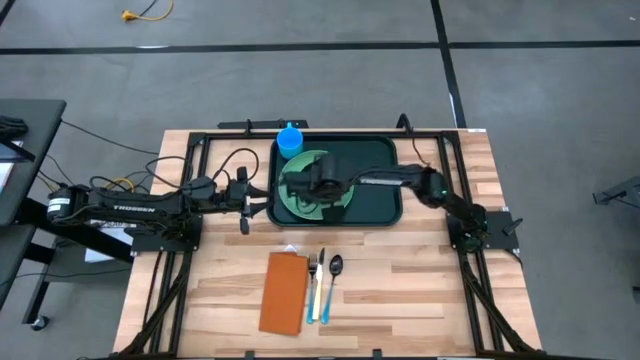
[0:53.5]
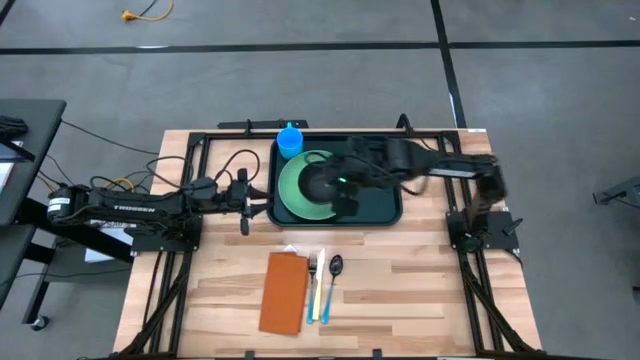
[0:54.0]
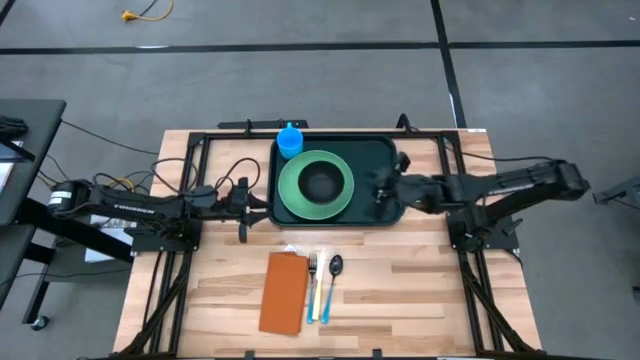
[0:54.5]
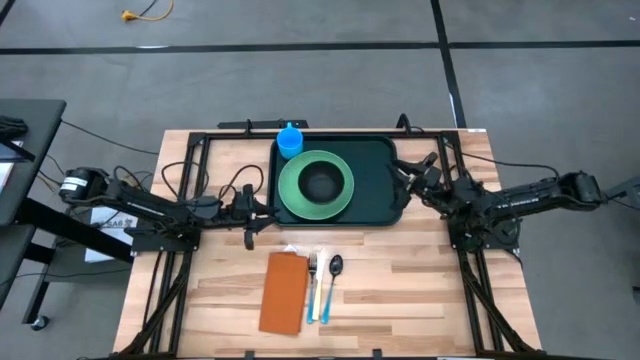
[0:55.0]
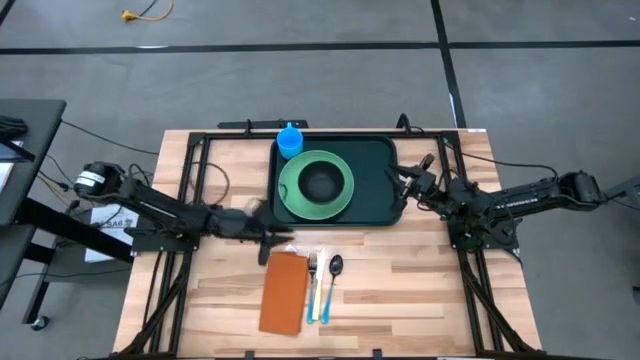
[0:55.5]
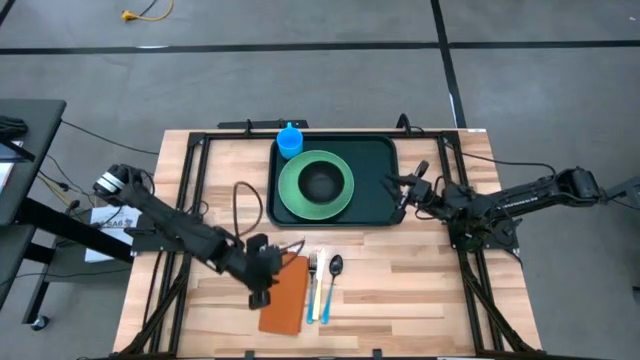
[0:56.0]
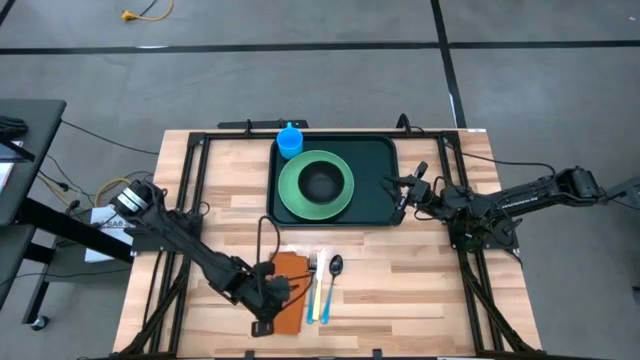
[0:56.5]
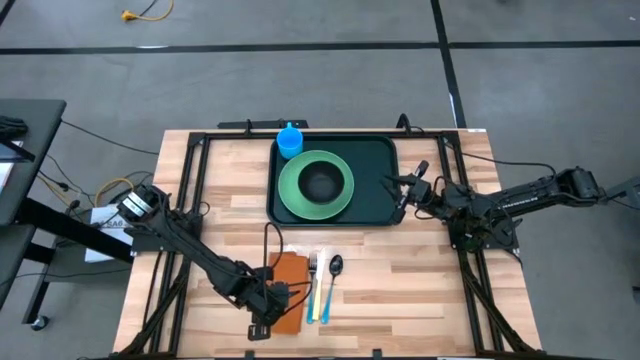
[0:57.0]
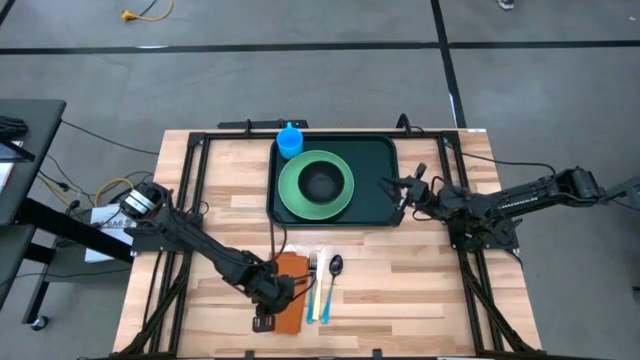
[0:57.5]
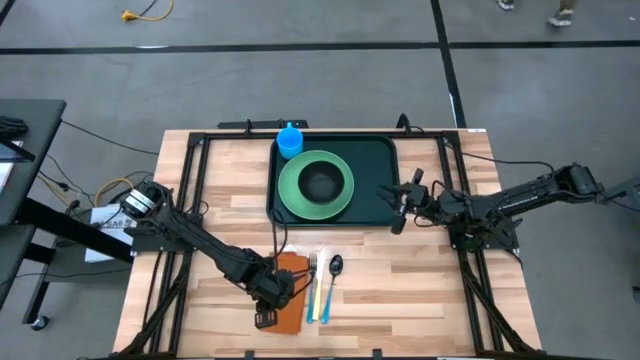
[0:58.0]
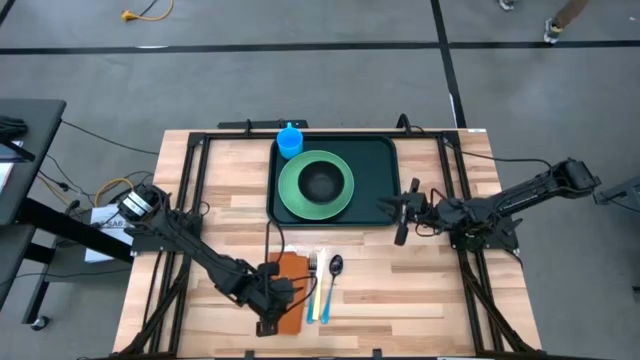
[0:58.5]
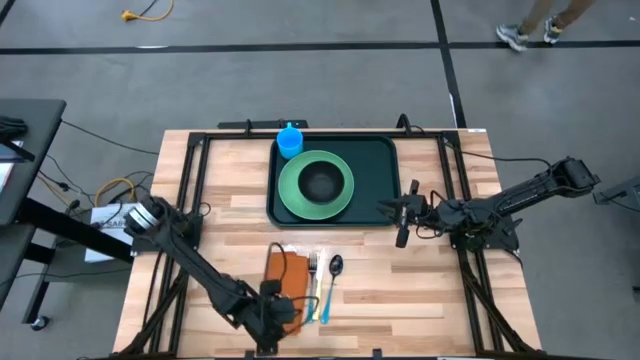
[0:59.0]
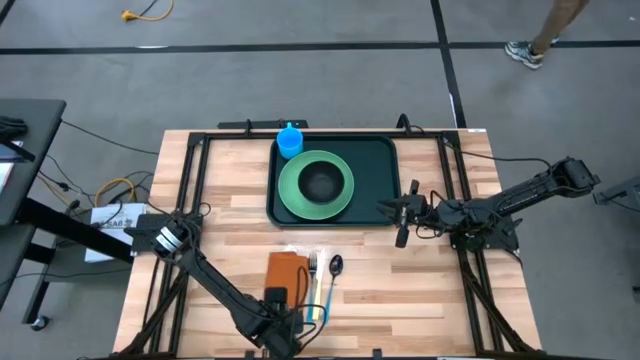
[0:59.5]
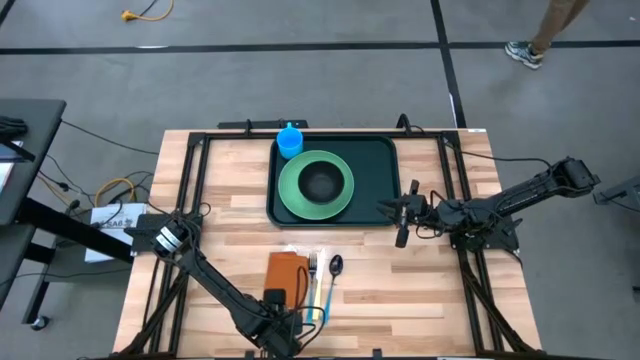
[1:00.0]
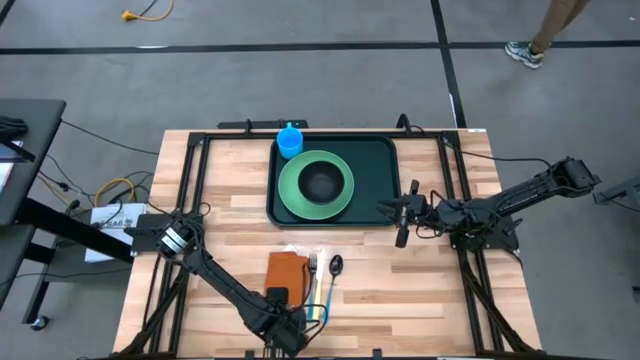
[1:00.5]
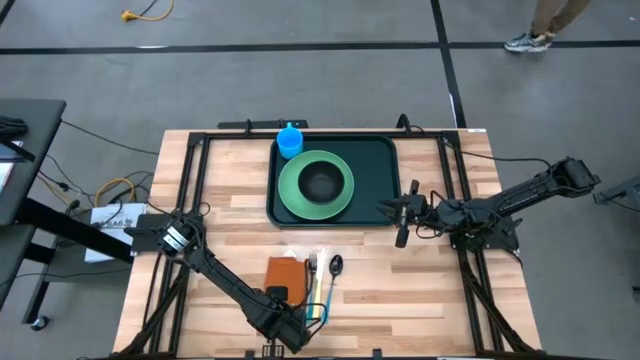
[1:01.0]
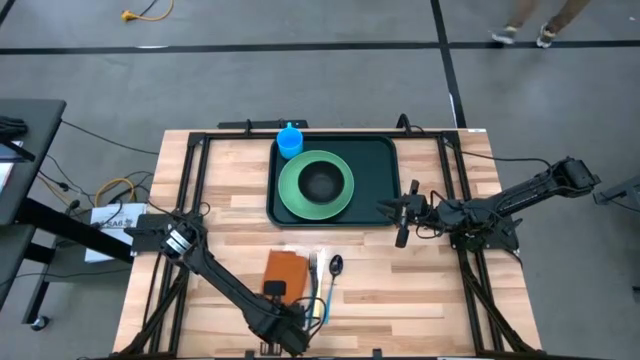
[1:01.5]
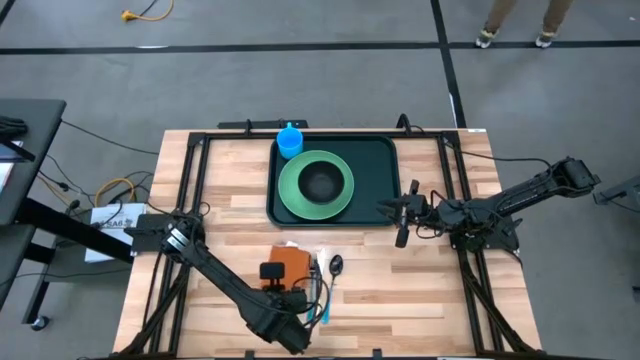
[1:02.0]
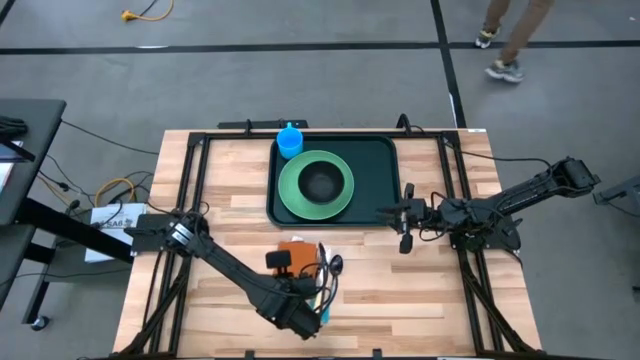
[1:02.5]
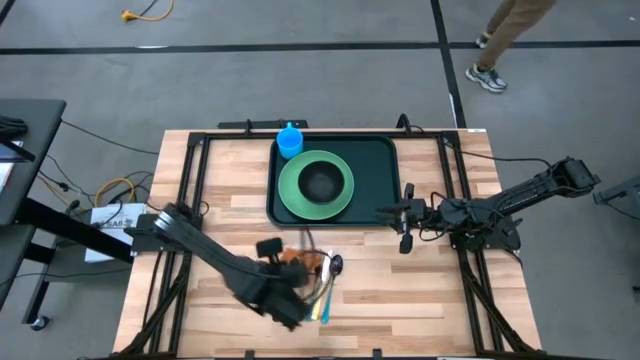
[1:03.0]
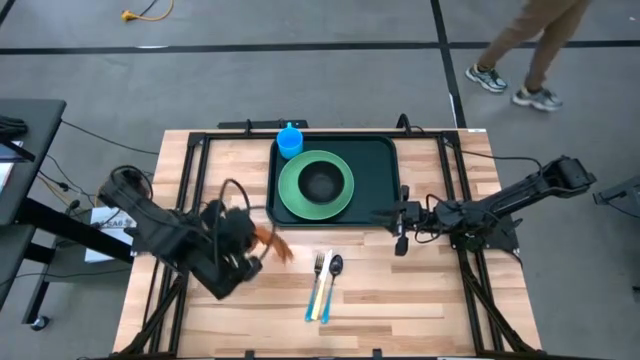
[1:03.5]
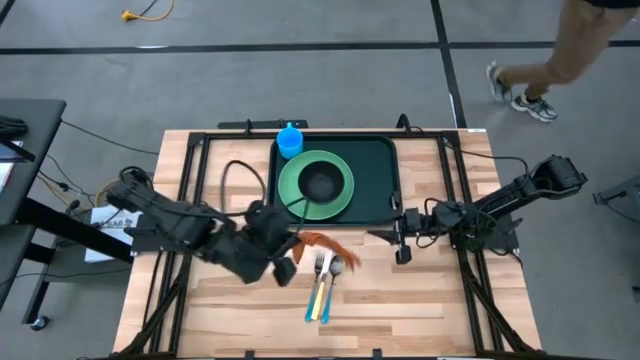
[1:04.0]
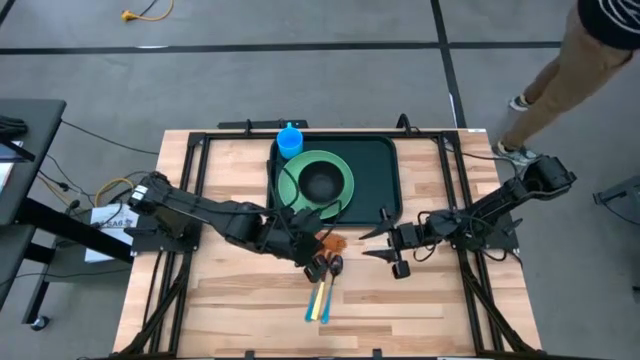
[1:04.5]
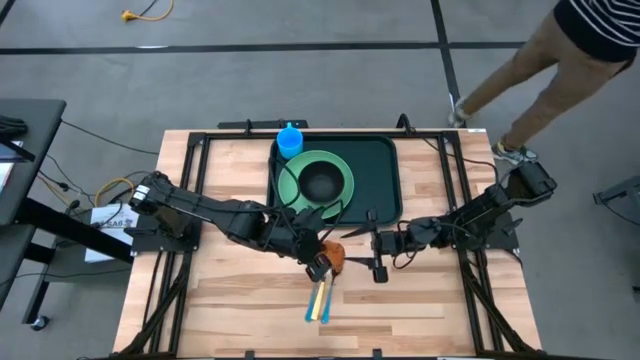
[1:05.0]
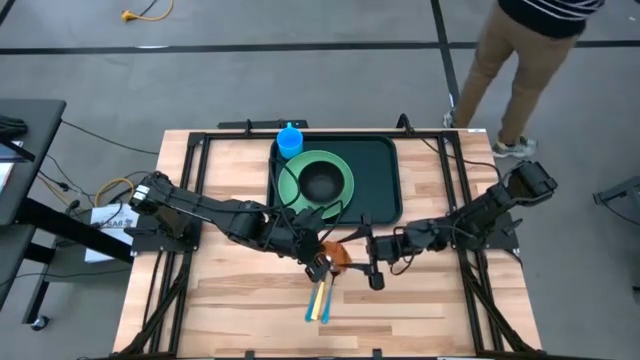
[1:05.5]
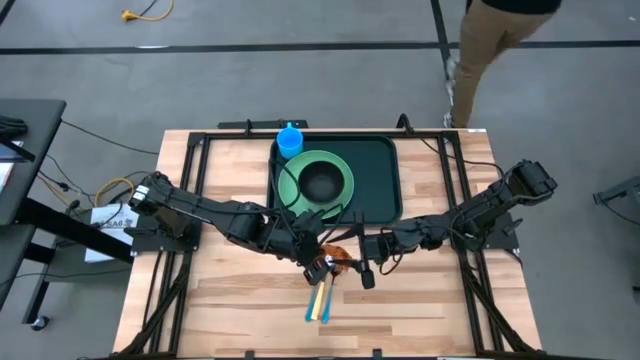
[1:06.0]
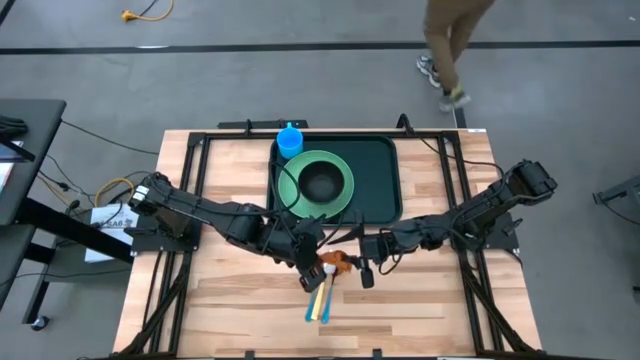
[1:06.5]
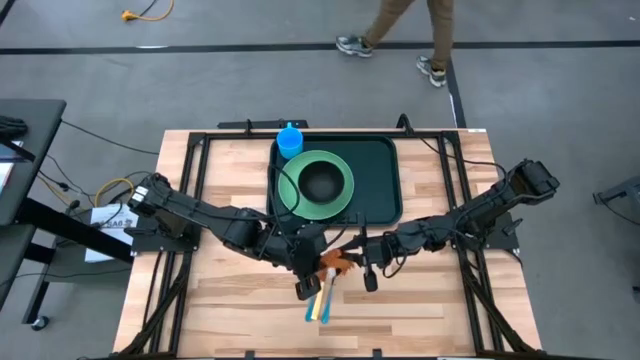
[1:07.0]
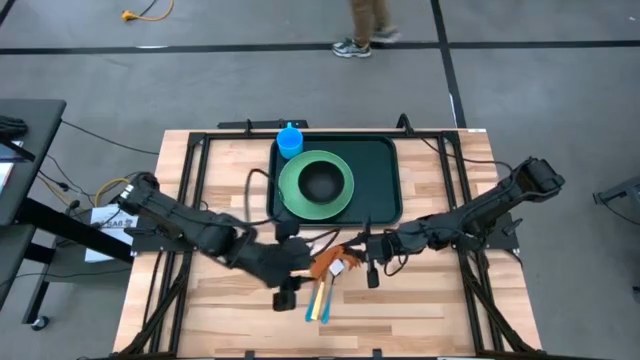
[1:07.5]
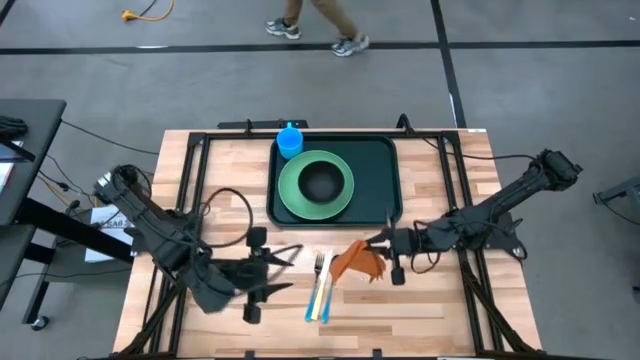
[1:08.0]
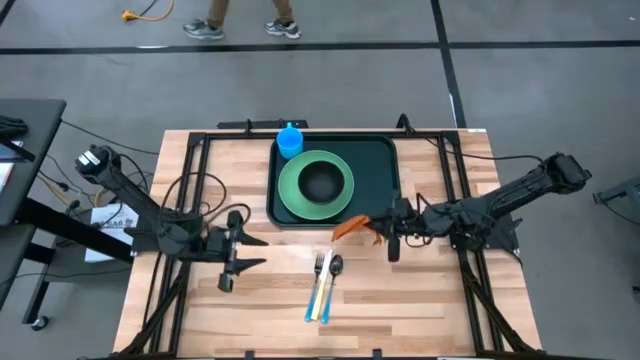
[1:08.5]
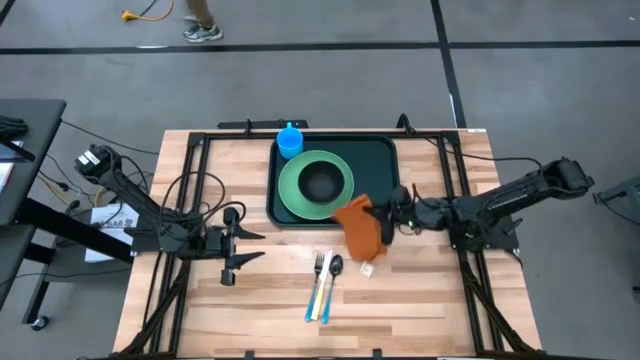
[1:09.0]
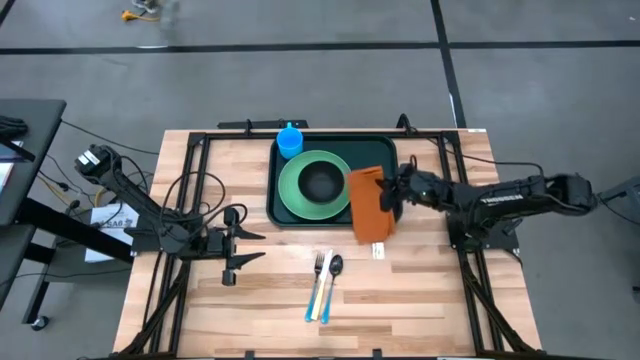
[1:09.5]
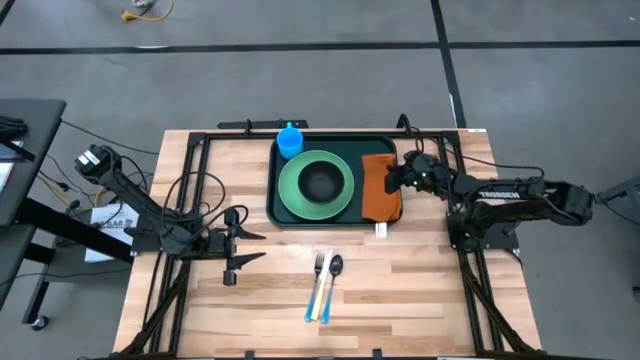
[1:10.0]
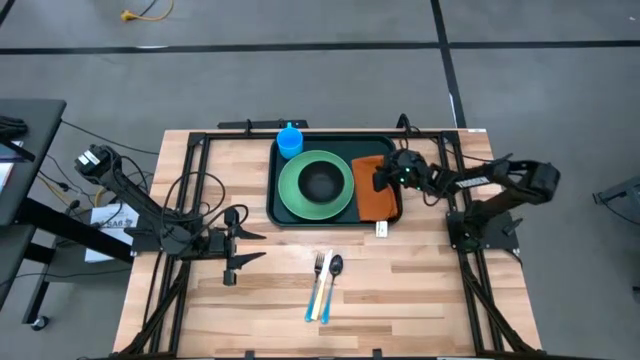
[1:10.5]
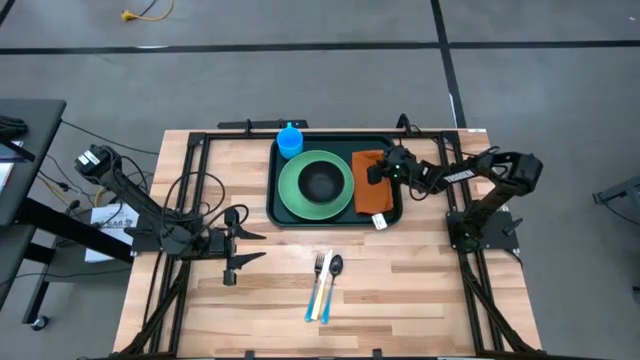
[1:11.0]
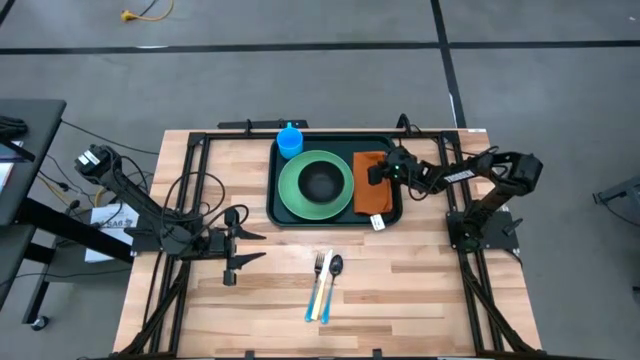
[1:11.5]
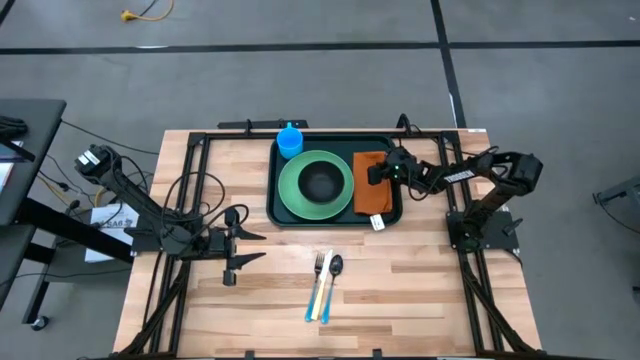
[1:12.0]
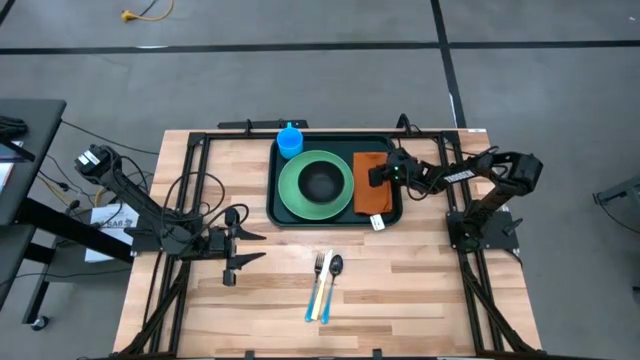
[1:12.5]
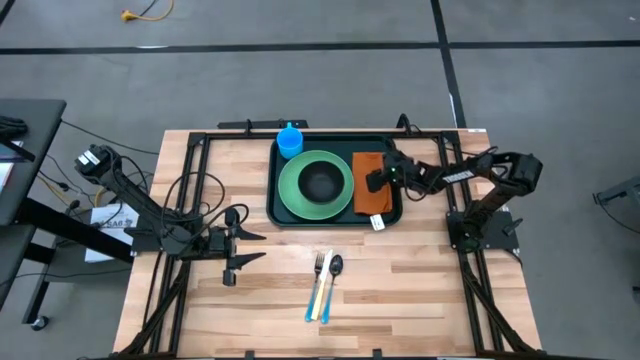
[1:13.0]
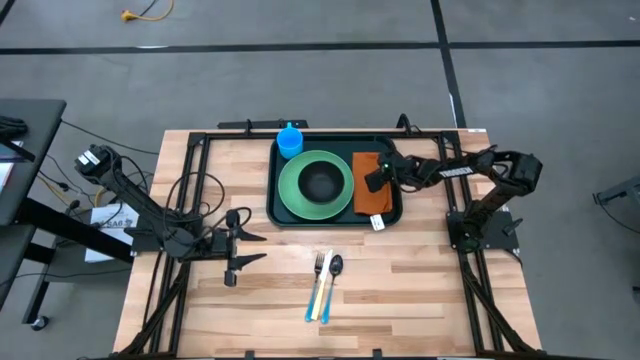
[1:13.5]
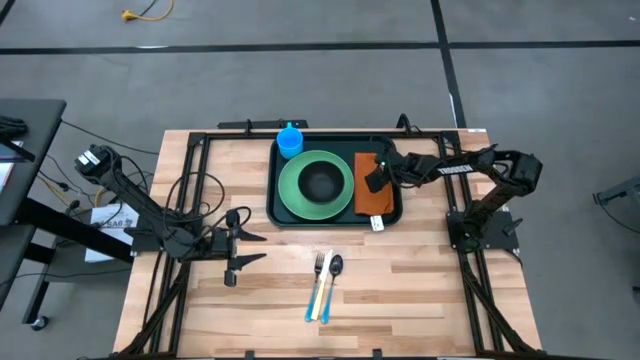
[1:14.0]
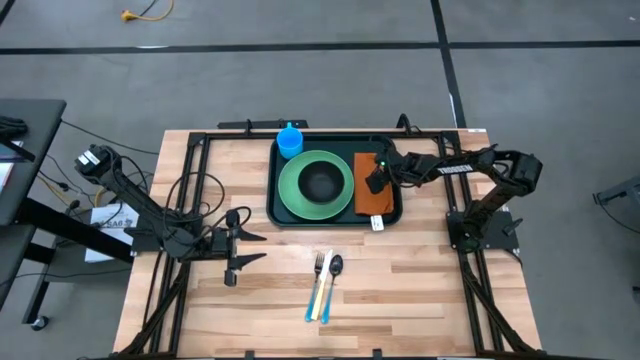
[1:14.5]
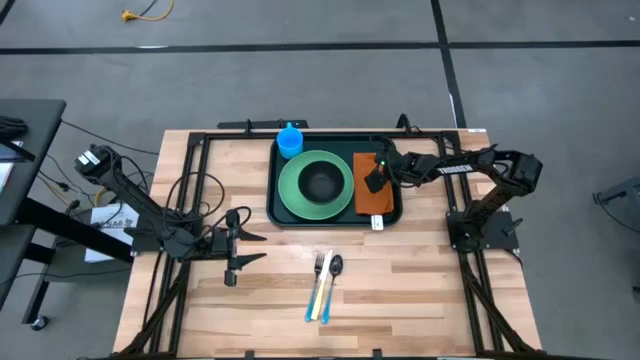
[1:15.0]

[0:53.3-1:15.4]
Task: Set up tray
Put the orange table napkin to the right side of the light green plate on the black serving tray
